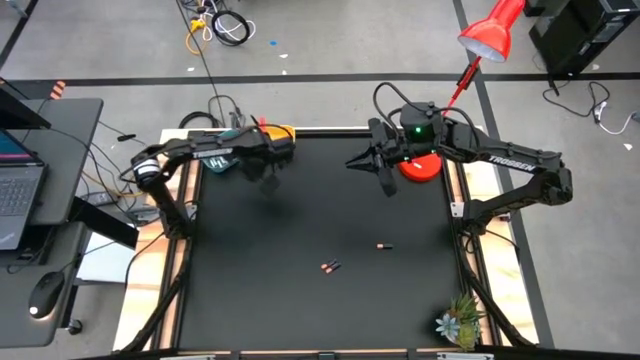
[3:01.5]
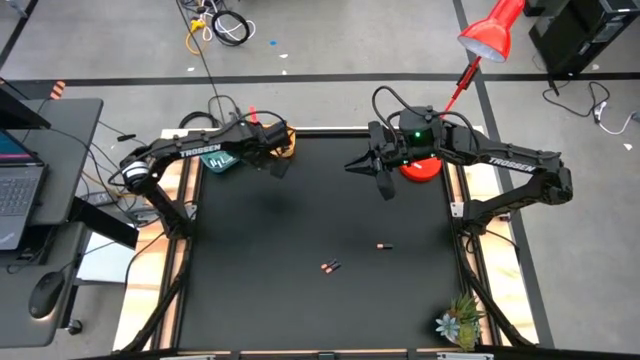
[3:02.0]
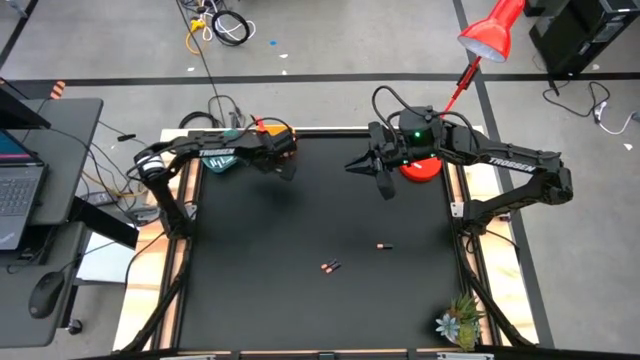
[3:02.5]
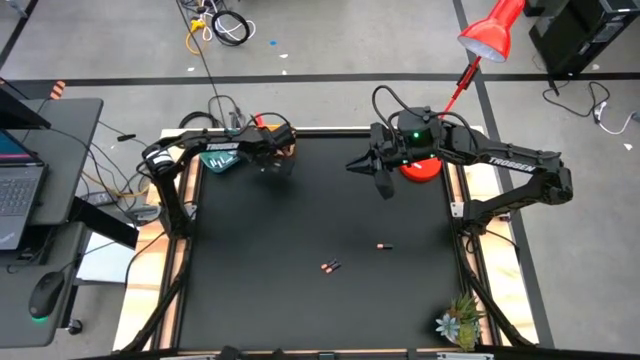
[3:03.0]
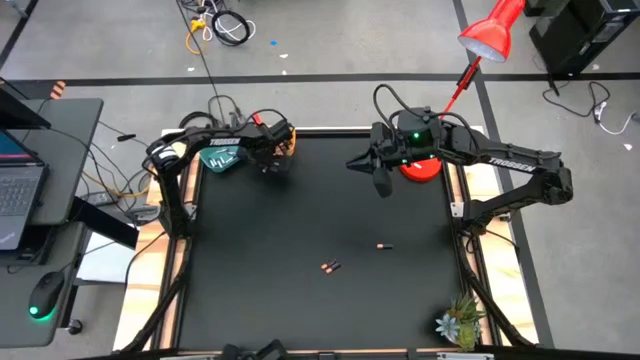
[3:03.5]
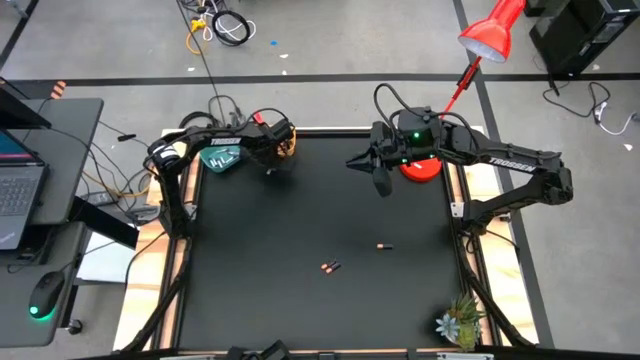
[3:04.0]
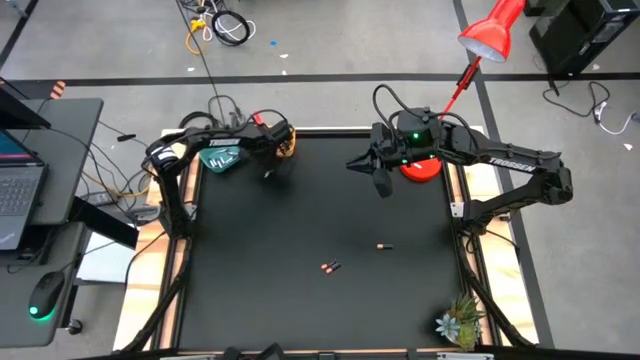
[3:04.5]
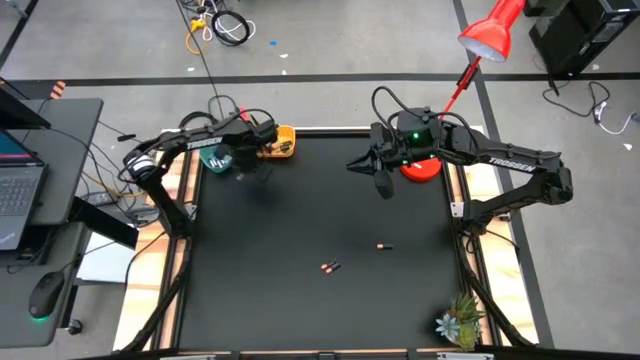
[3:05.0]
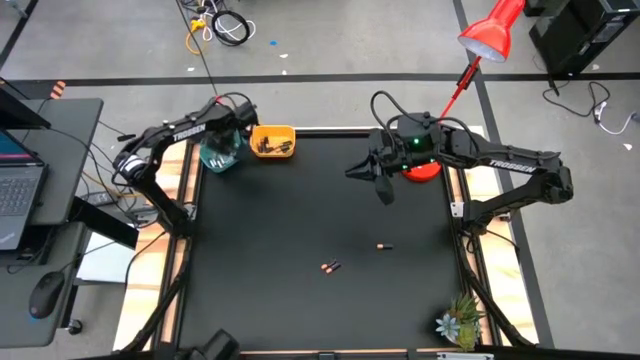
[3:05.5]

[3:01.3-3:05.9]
Task: Sort batteries
Put the silver battery into the blue bin

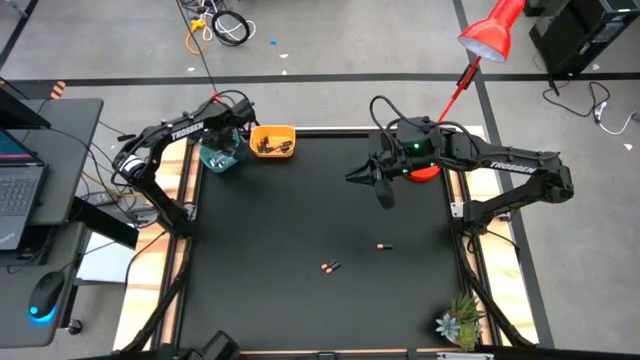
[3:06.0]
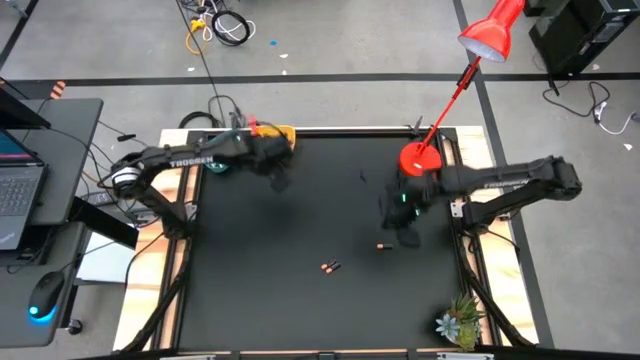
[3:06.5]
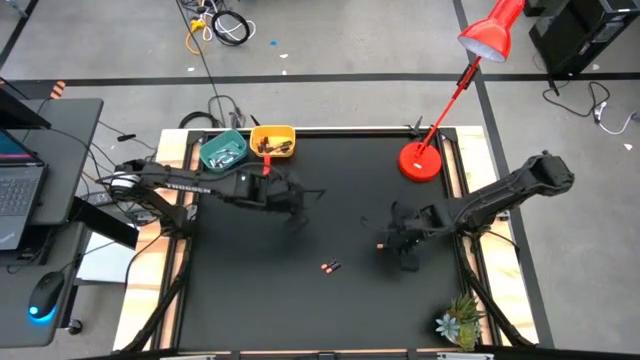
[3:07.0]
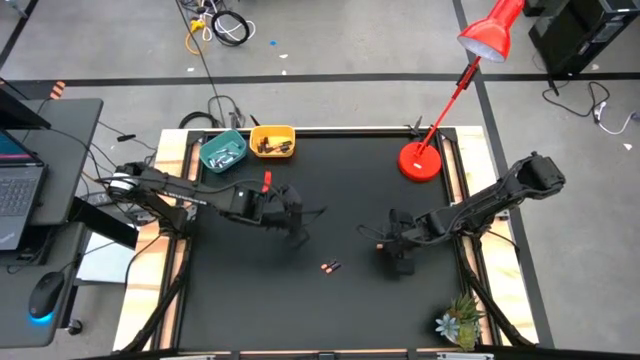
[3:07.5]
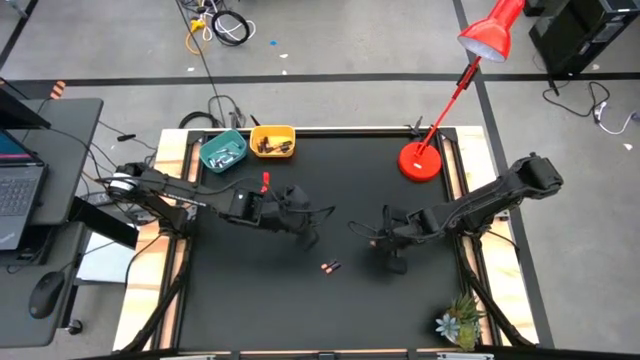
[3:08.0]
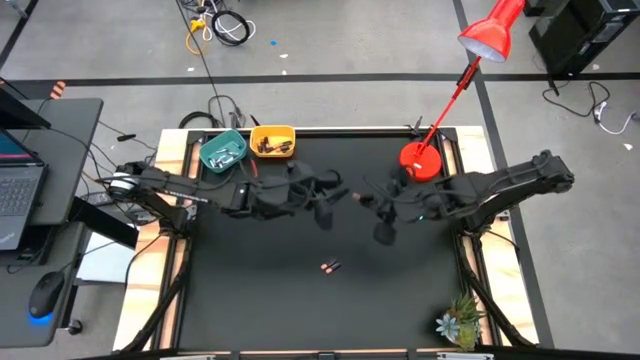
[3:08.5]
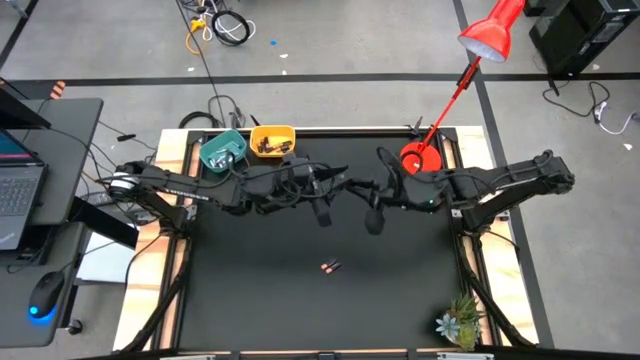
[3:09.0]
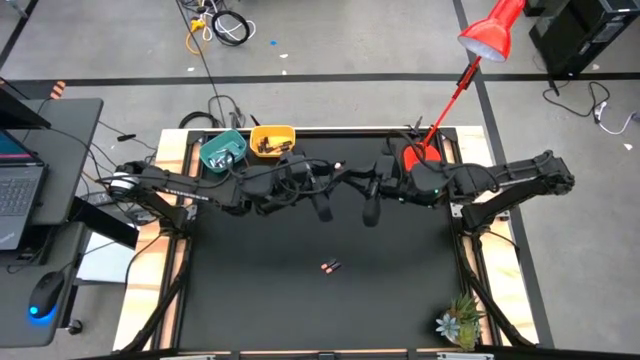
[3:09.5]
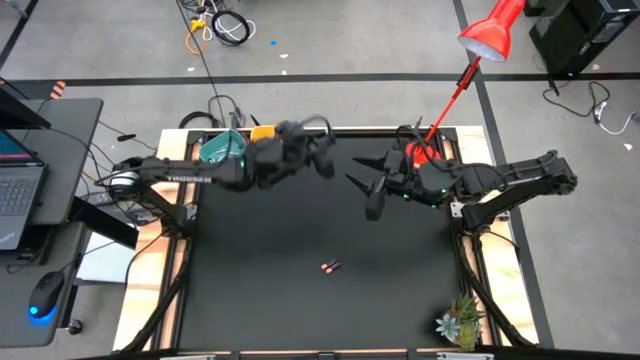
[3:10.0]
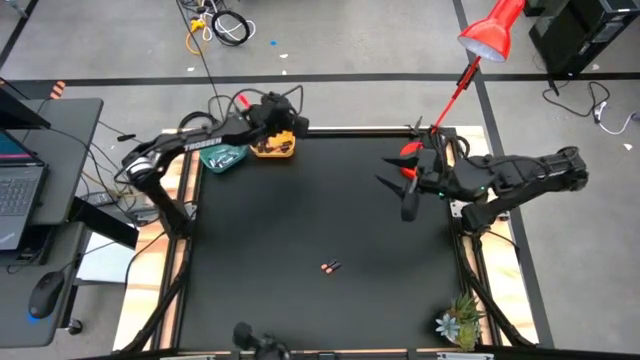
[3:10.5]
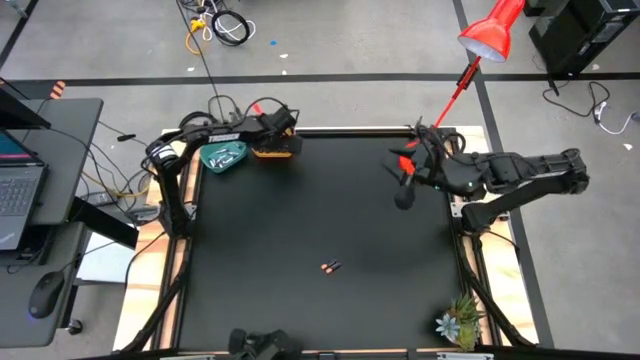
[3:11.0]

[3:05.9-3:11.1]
Put the top right black battery into the yellow bin

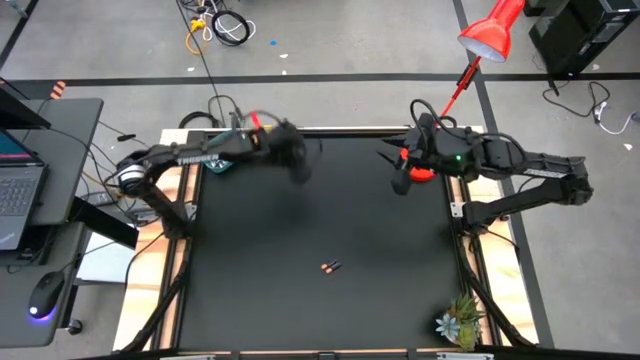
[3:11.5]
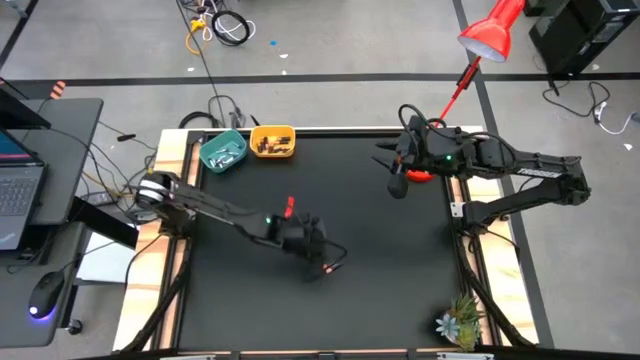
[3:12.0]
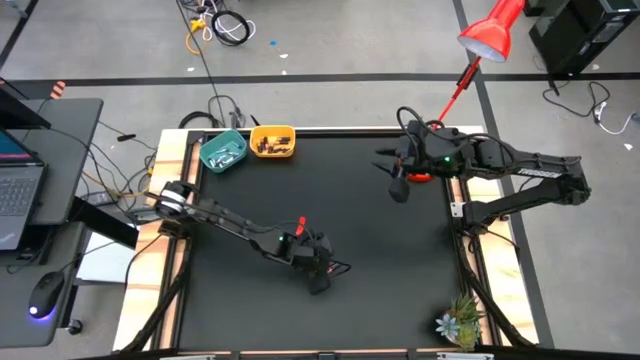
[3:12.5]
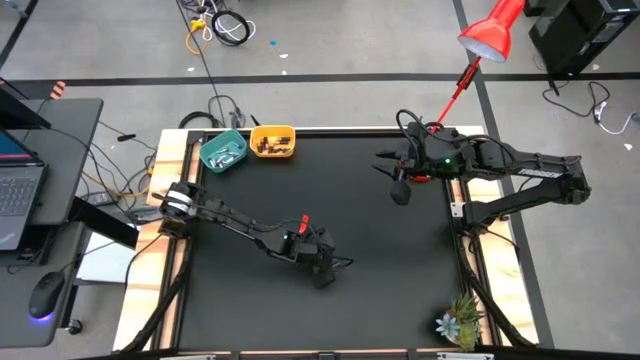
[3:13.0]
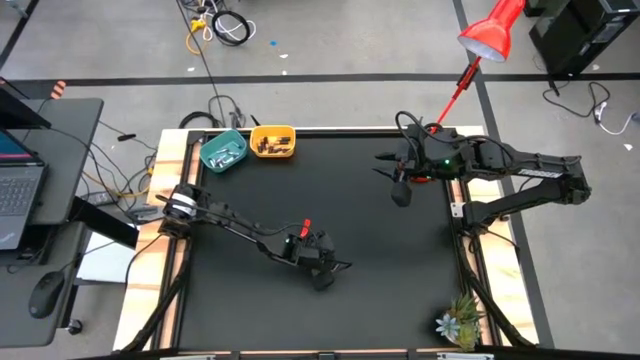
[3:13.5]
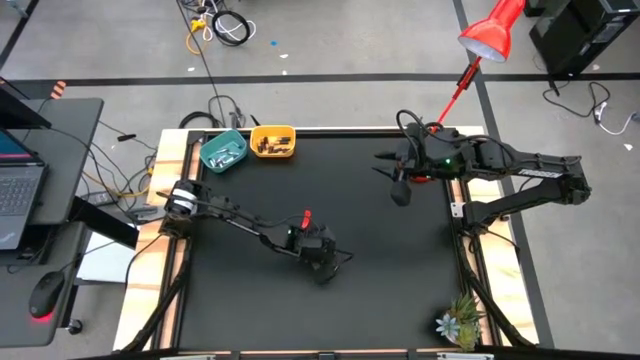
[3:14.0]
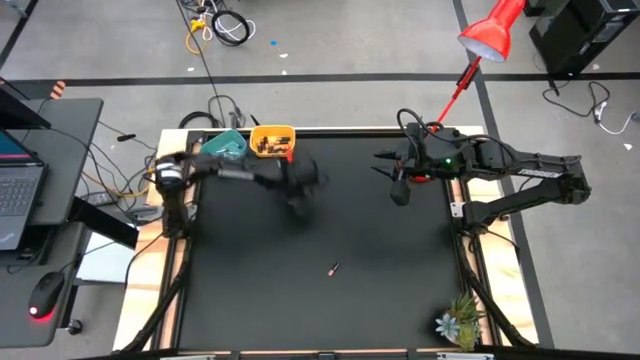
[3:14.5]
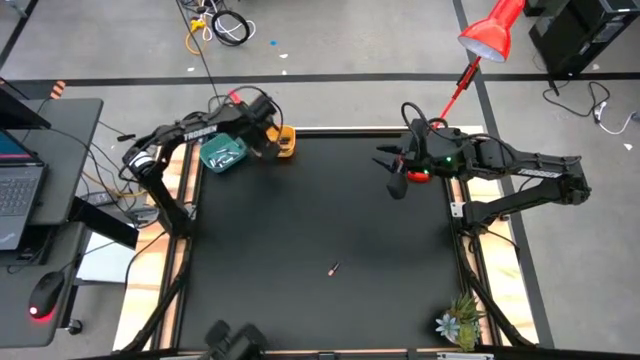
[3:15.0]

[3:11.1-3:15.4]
Put the top black battery into the yellow bin

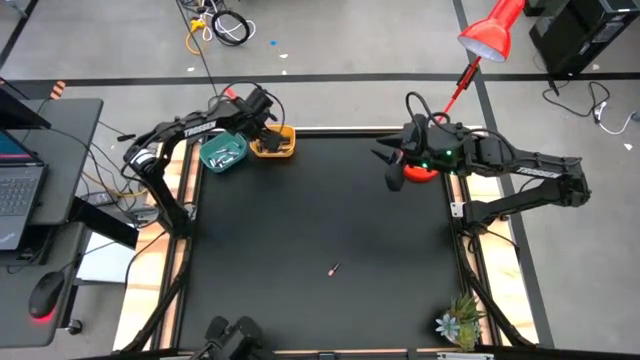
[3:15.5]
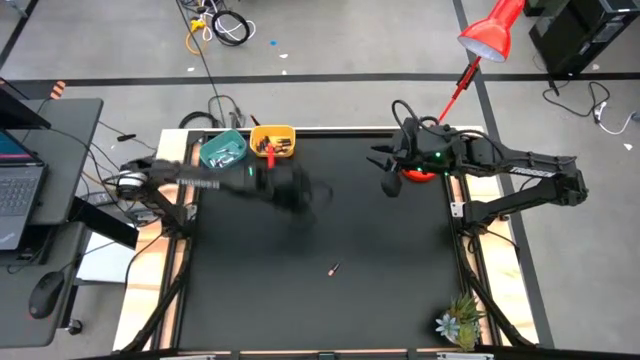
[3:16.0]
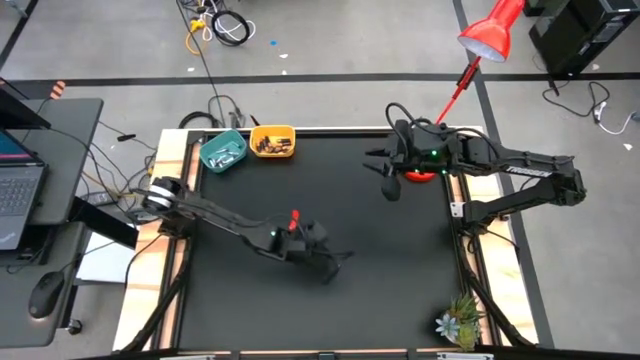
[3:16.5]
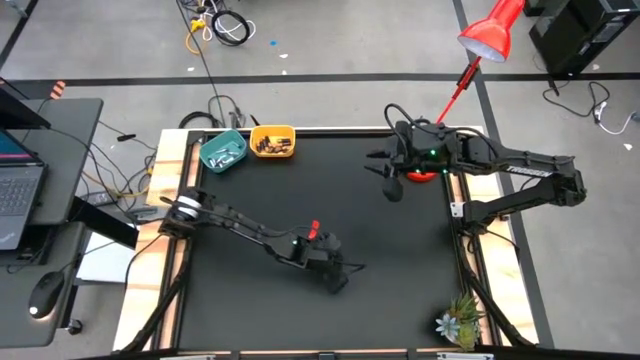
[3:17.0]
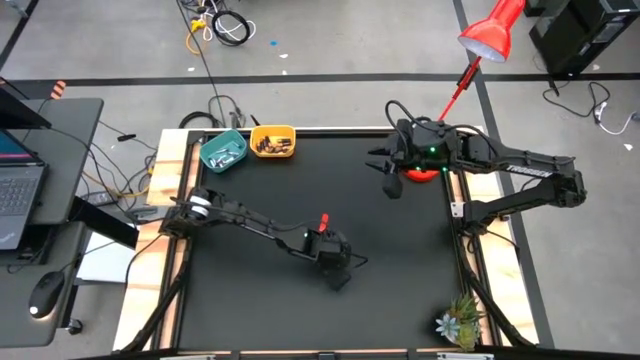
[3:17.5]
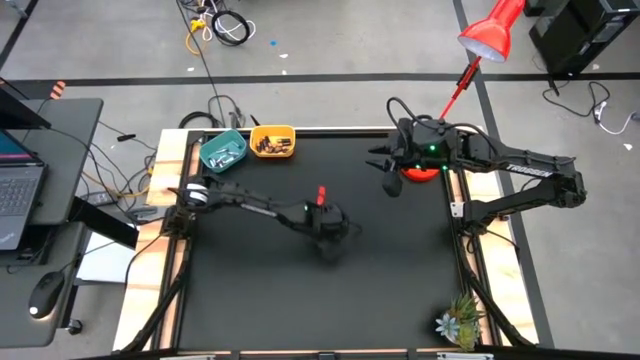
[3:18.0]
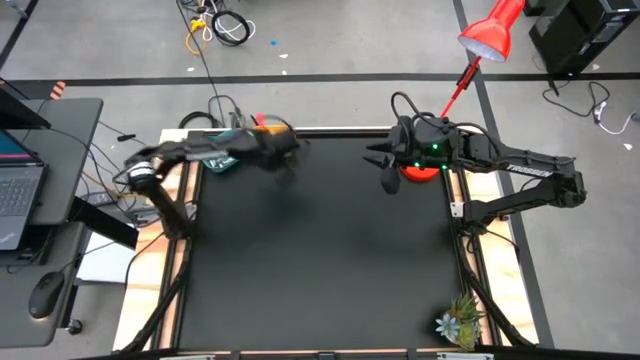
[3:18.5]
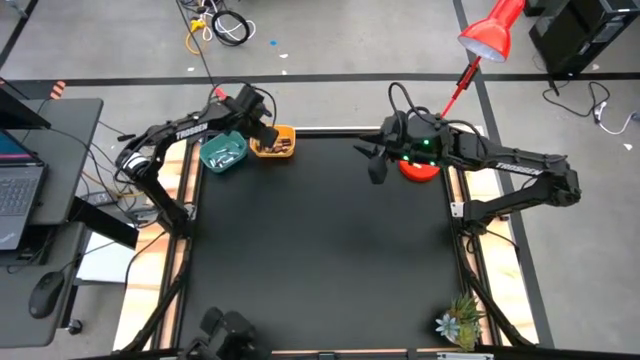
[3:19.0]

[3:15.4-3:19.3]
Put the black battery into the yellow bin

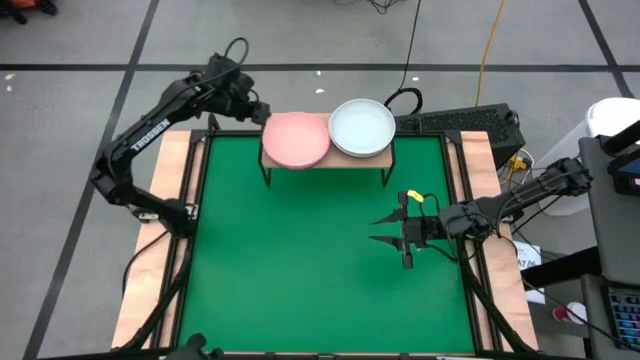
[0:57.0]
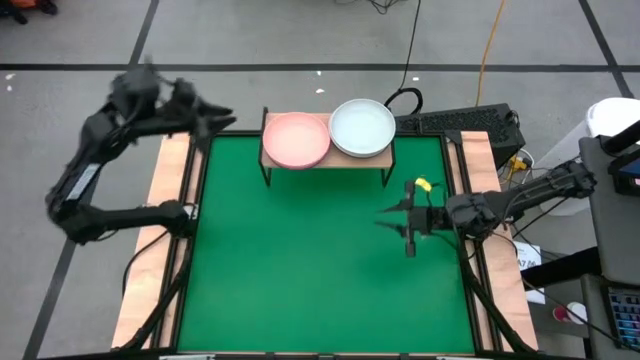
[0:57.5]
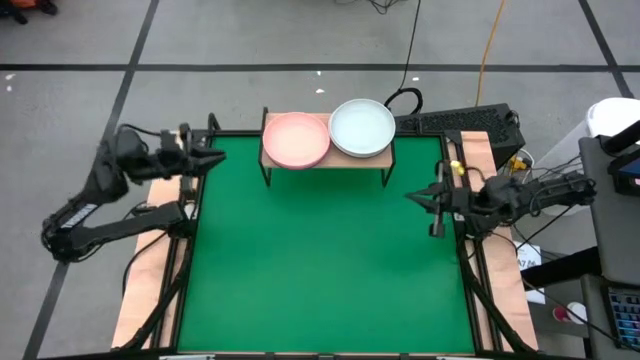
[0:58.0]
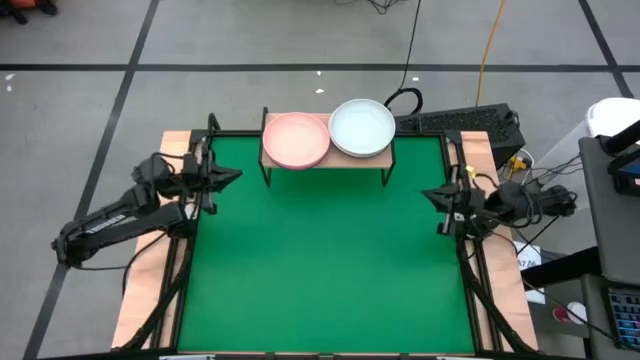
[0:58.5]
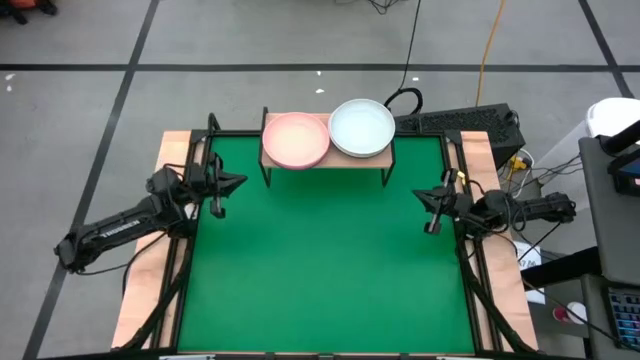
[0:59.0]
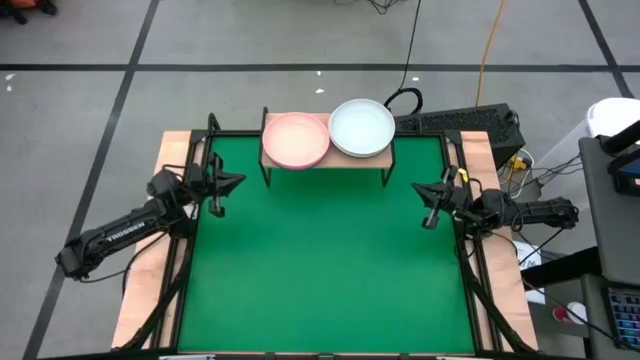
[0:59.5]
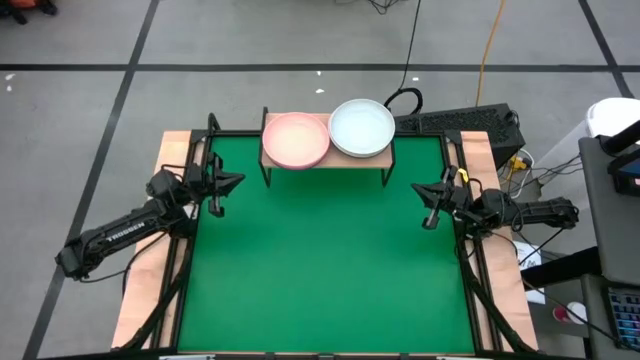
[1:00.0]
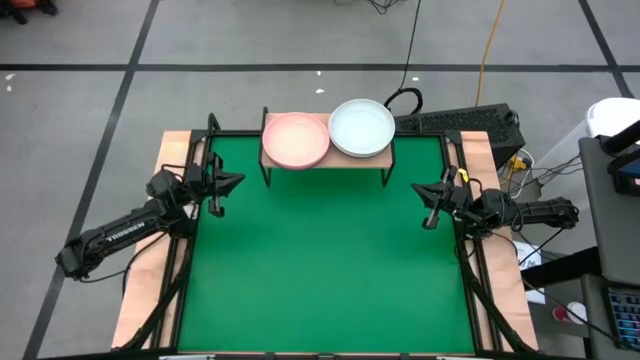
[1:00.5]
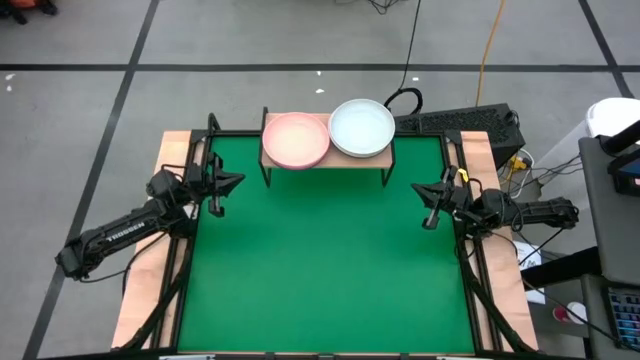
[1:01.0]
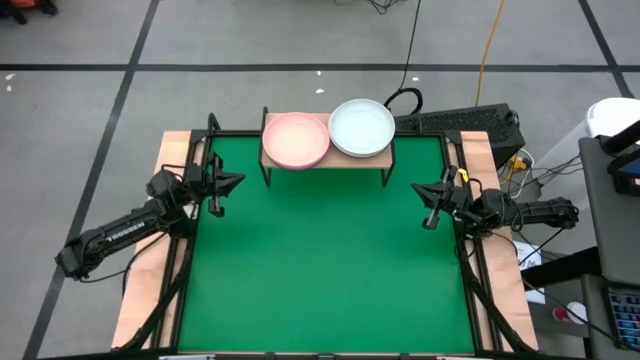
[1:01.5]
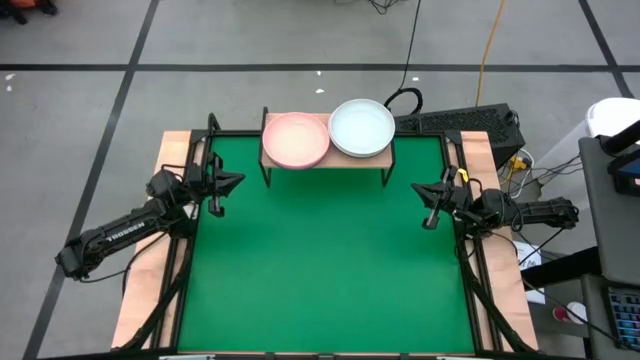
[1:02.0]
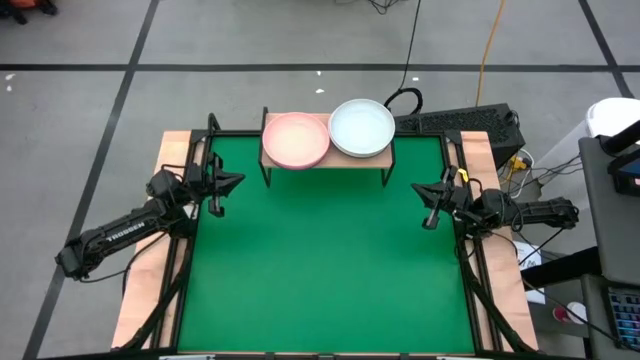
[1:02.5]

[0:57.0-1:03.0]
Task: Place and stack plates onto a shelf
Return to Home Position
